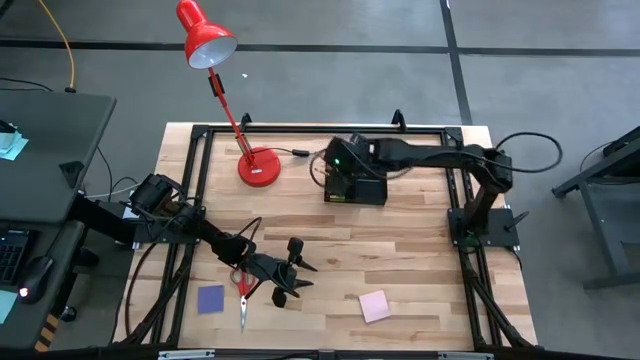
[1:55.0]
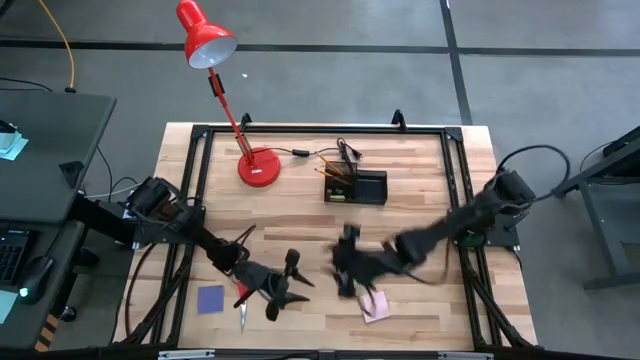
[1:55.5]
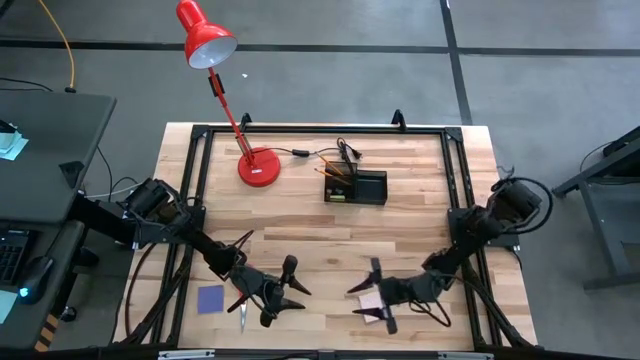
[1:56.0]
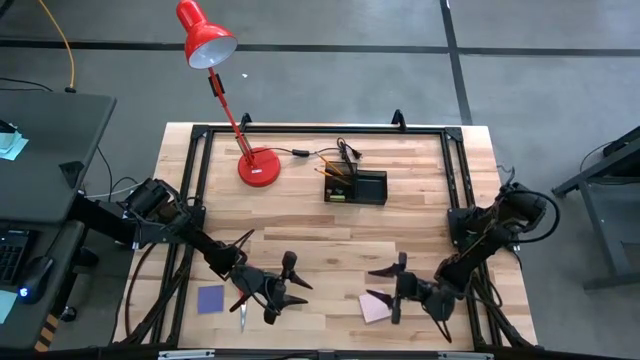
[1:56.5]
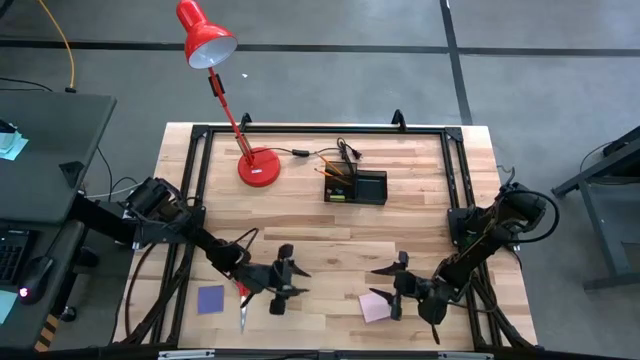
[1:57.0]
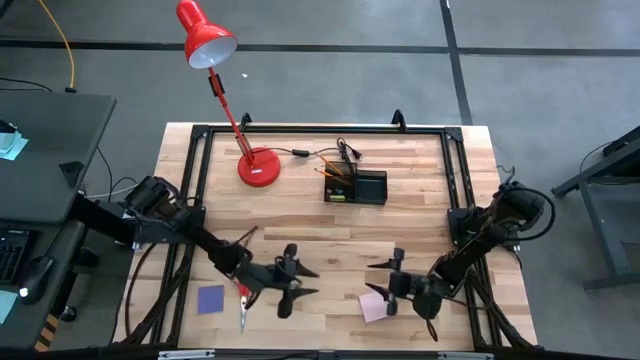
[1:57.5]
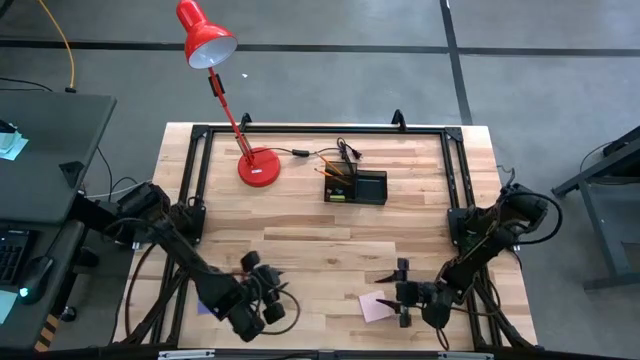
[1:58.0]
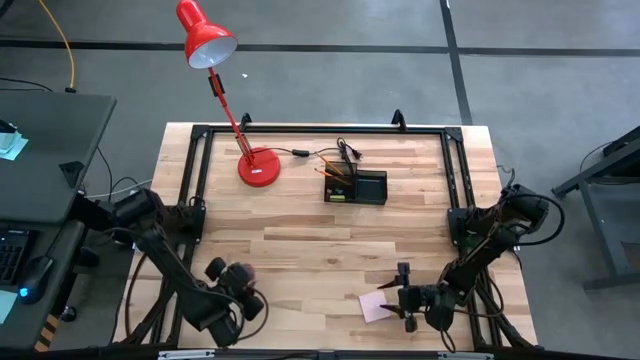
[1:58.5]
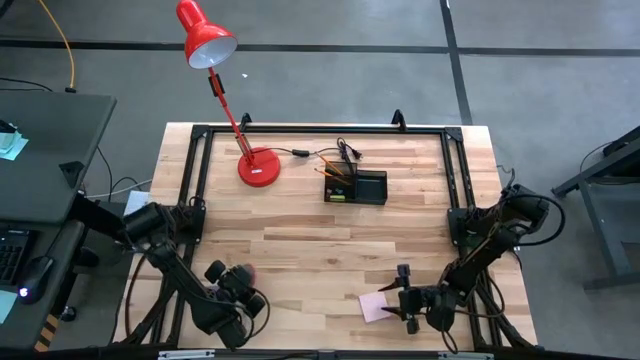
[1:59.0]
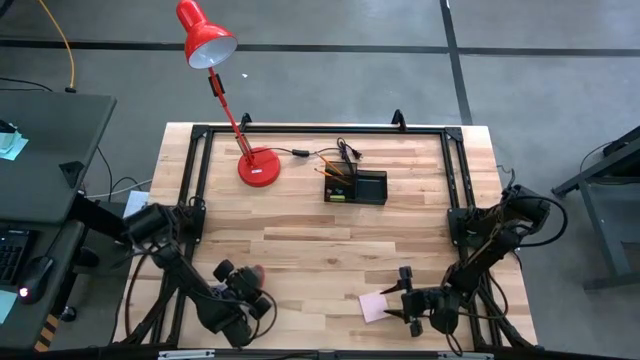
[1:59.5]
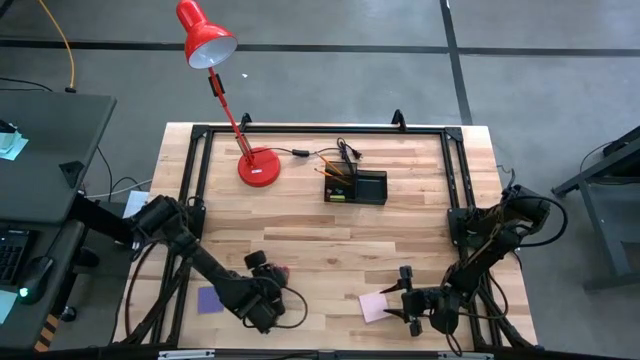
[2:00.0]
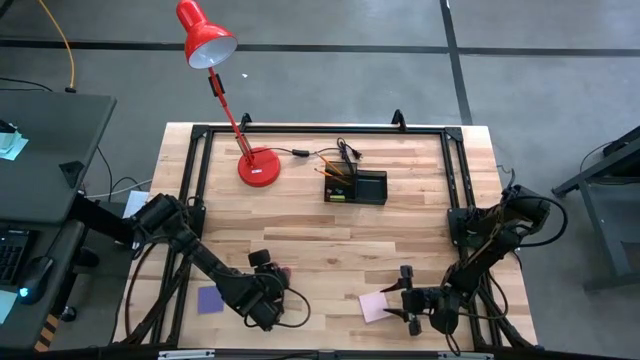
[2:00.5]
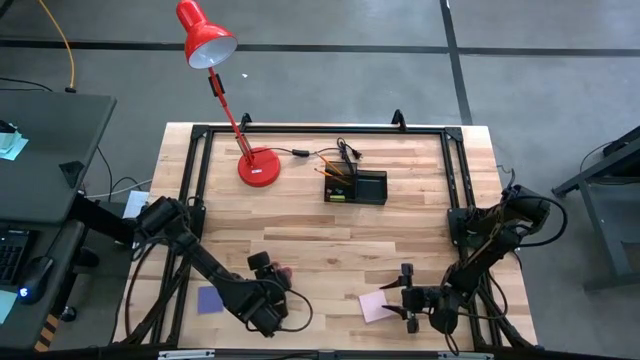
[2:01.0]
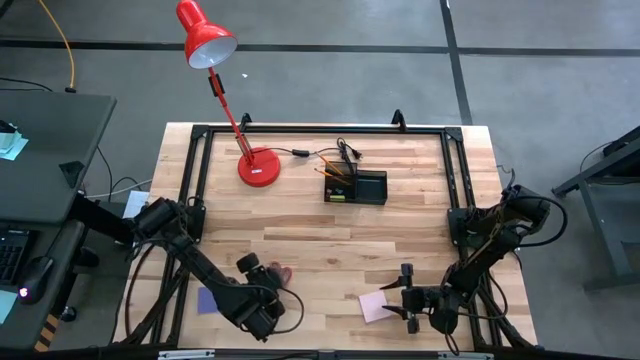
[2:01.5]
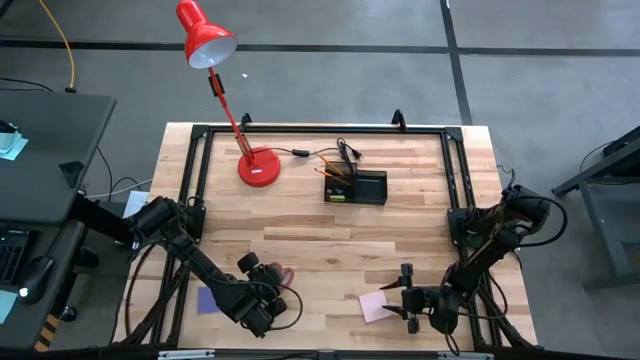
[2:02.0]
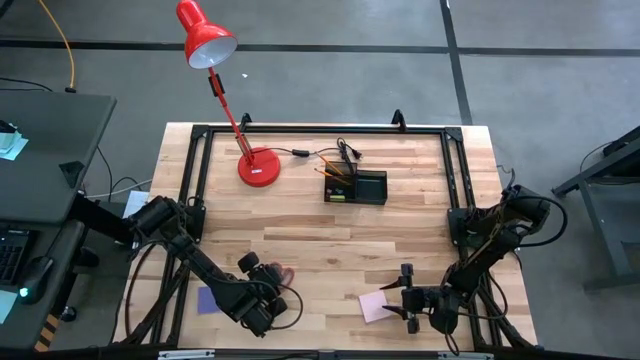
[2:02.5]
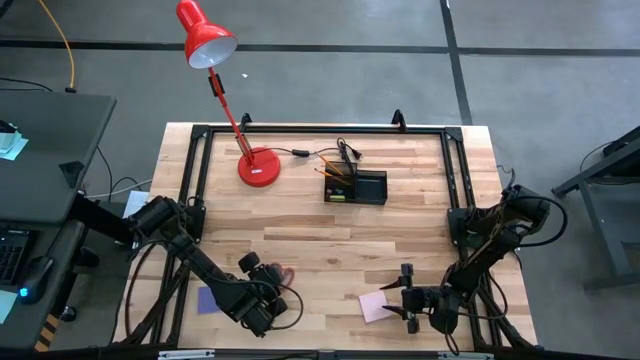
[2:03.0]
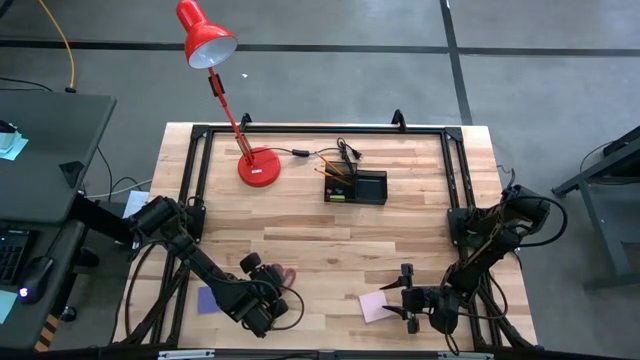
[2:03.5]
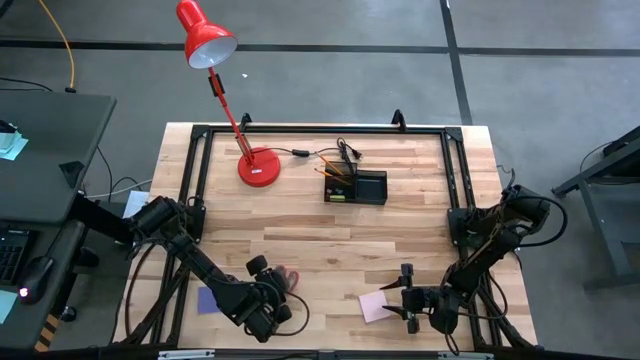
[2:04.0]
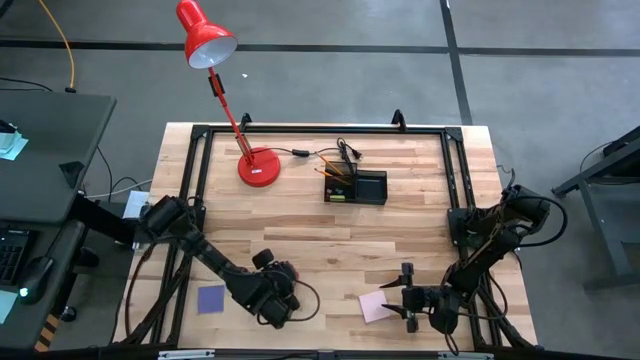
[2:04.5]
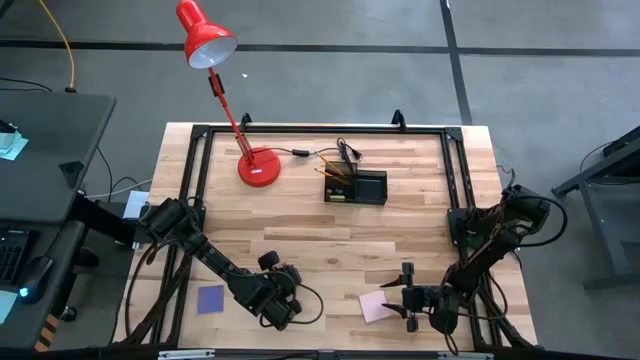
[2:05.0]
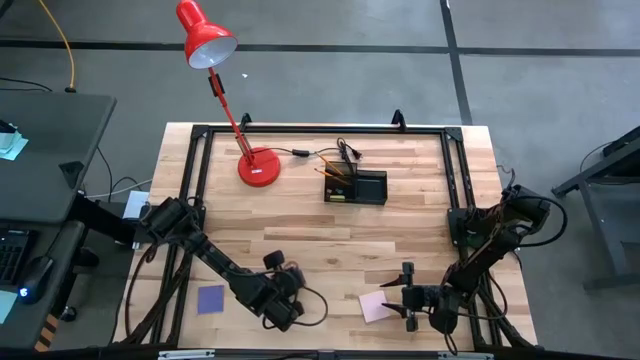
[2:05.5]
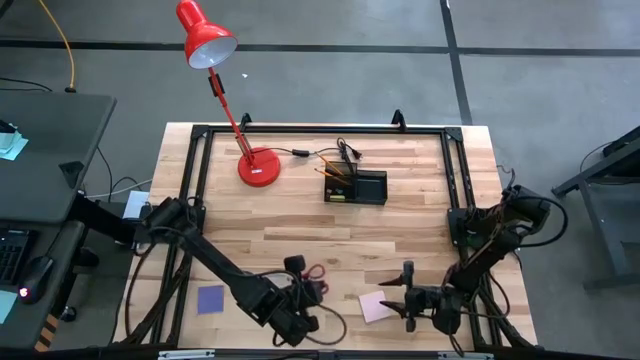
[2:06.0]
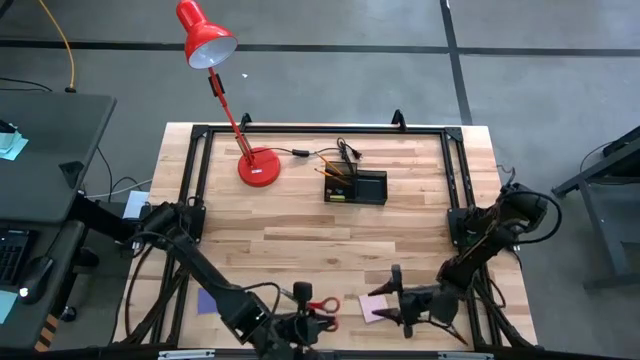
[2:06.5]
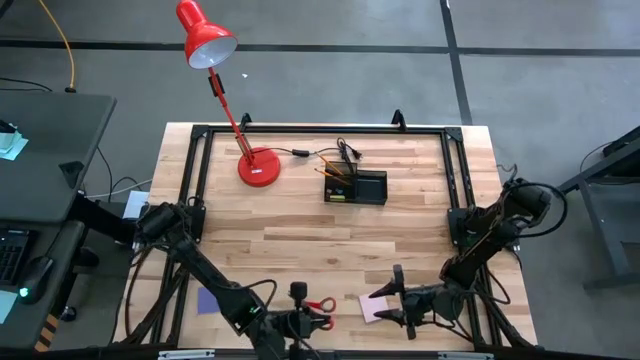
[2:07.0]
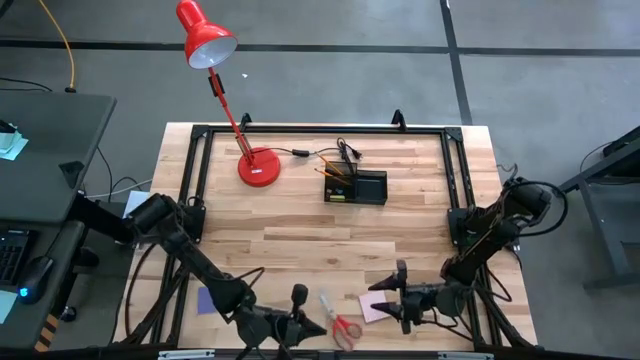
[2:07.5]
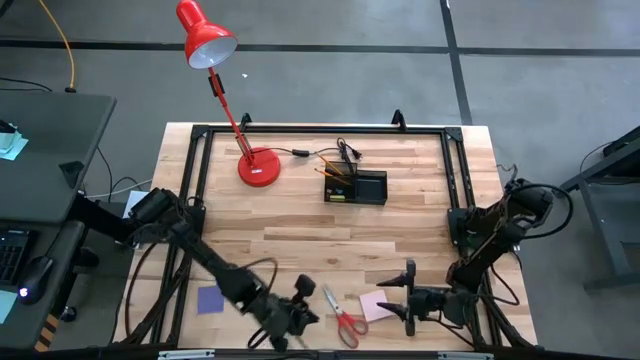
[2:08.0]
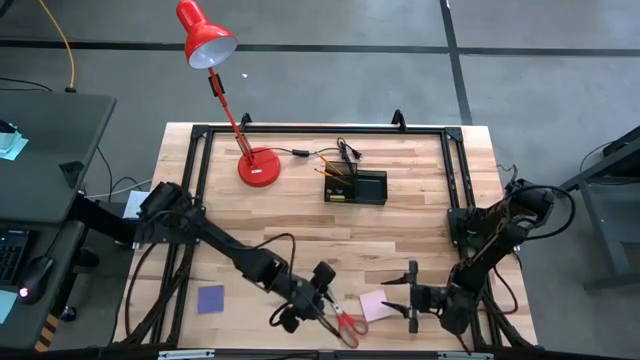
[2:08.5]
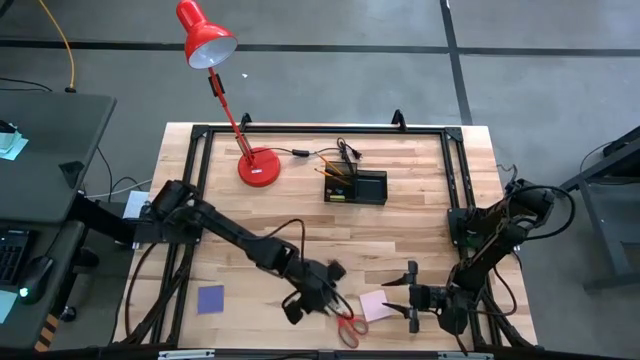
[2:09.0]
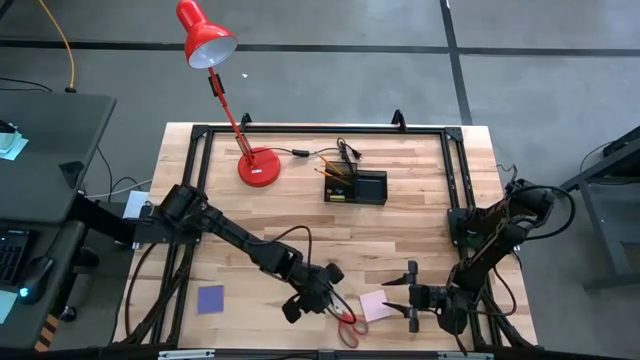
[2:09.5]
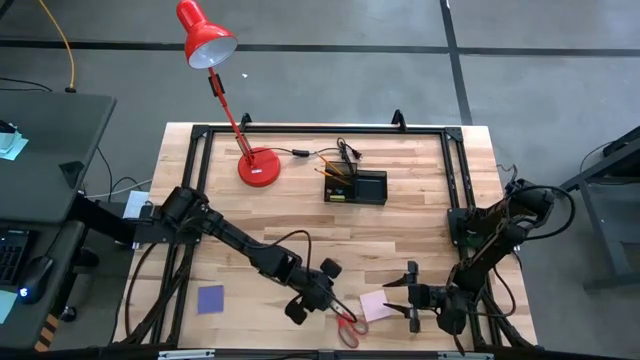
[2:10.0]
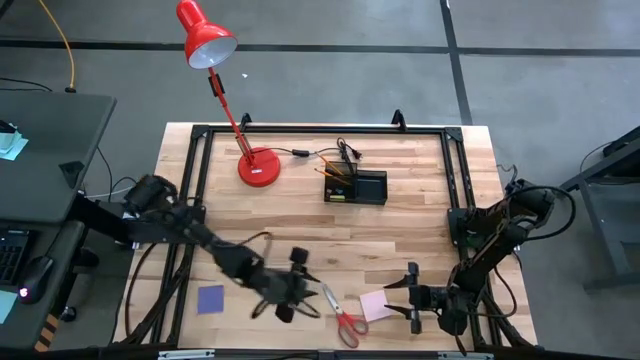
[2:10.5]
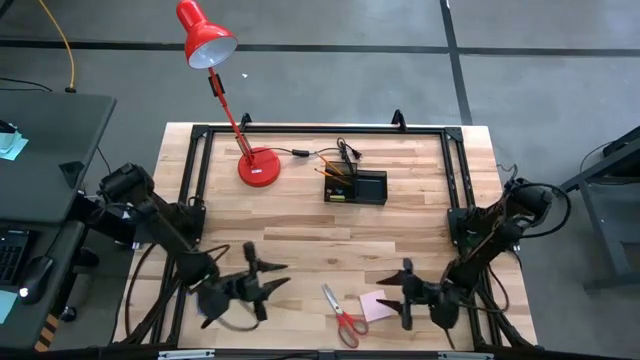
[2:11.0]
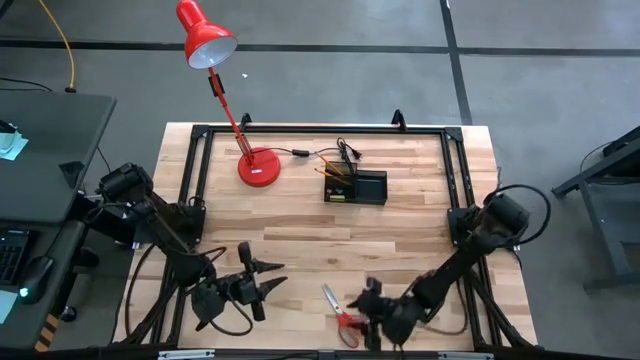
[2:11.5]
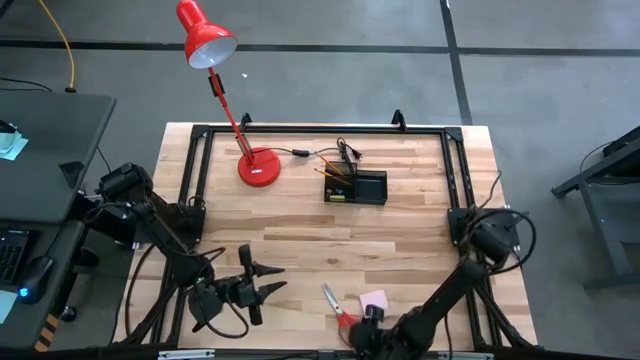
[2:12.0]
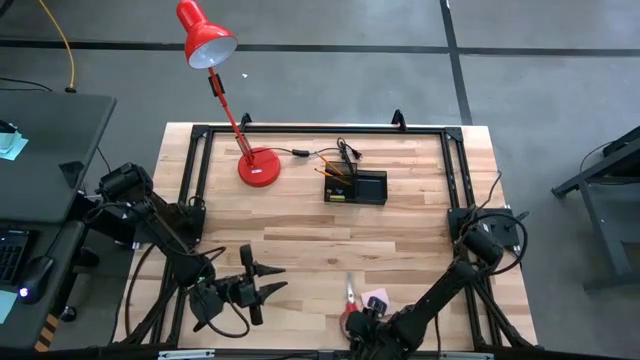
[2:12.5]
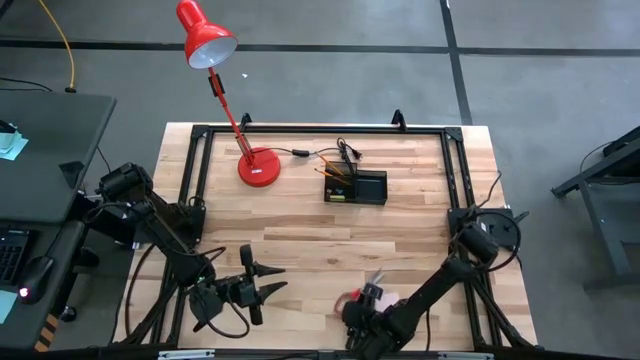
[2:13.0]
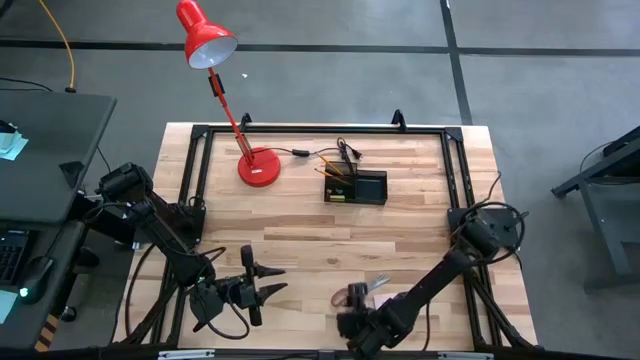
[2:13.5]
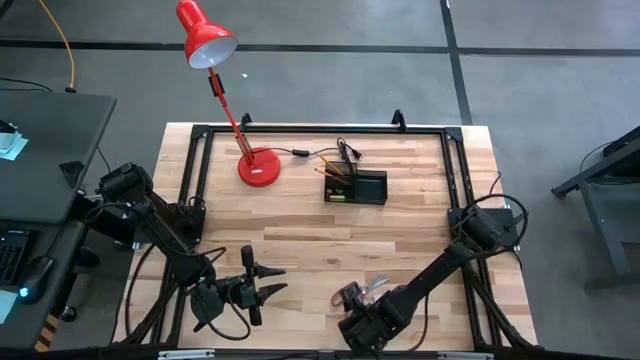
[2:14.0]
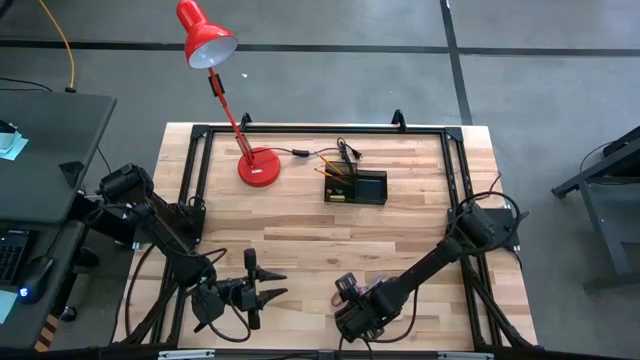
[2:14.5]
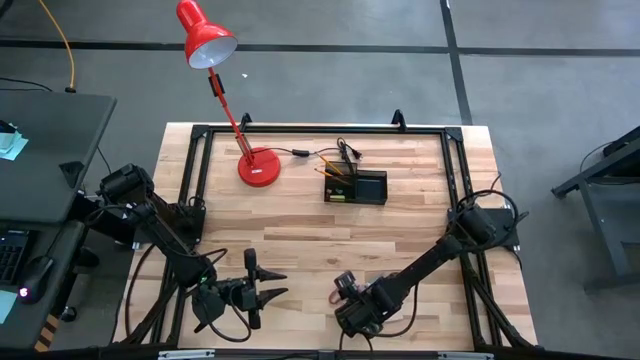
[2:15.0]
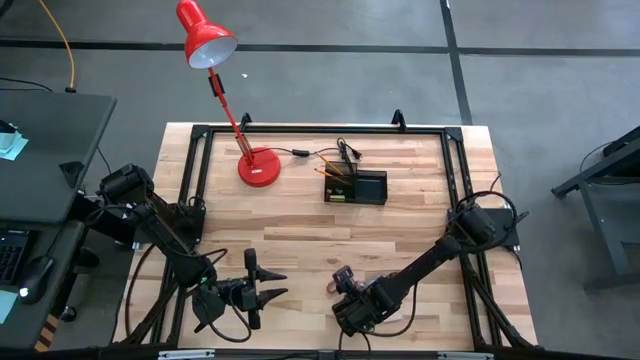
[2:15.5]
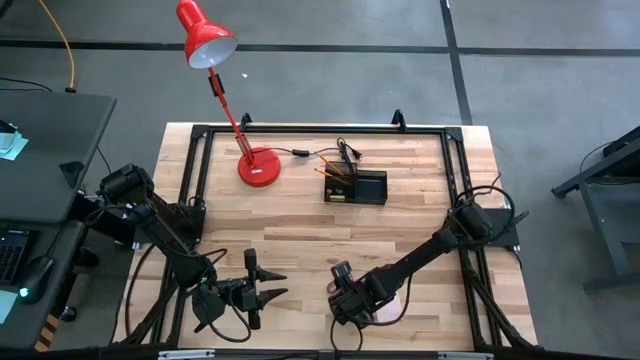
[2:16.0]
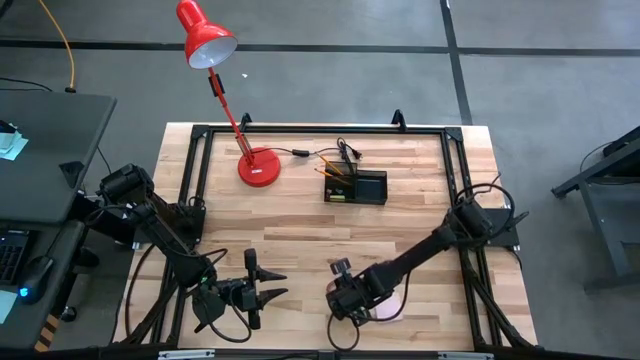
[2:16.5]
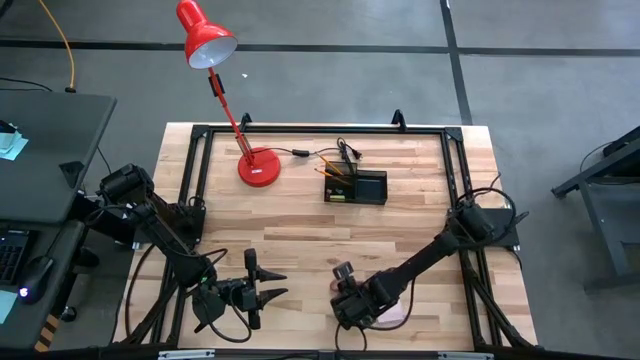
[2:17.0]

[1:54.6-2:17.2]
Task: Pick and place office supplies into organizer
Put the red scissors into the desk organizer
